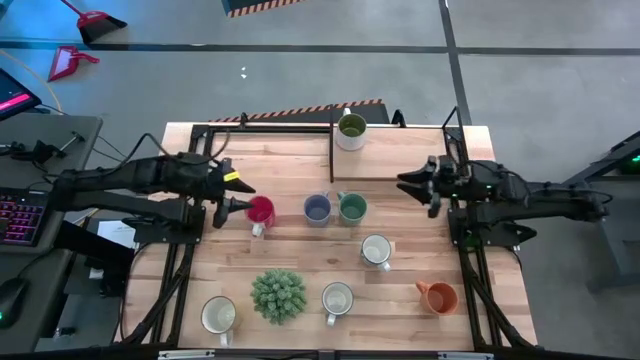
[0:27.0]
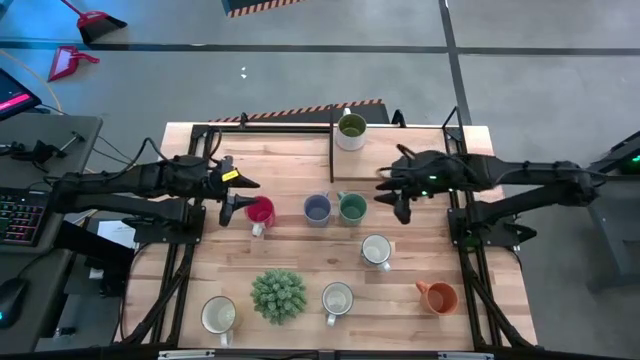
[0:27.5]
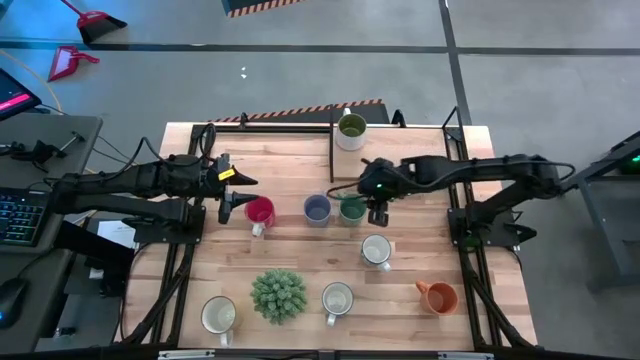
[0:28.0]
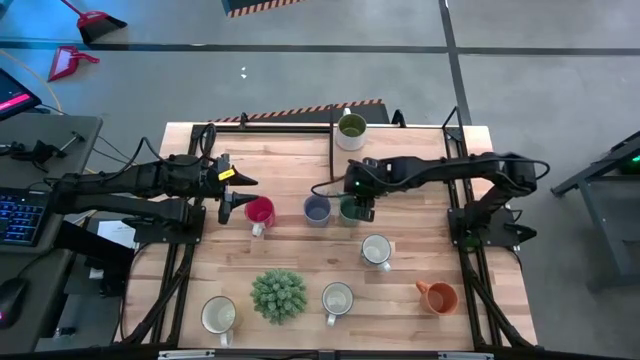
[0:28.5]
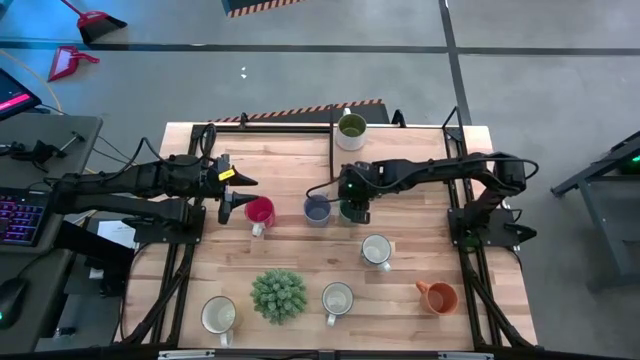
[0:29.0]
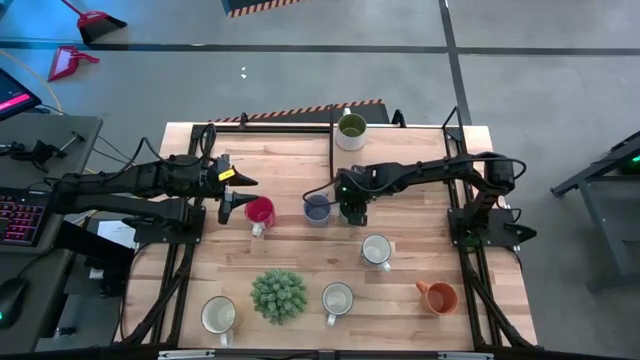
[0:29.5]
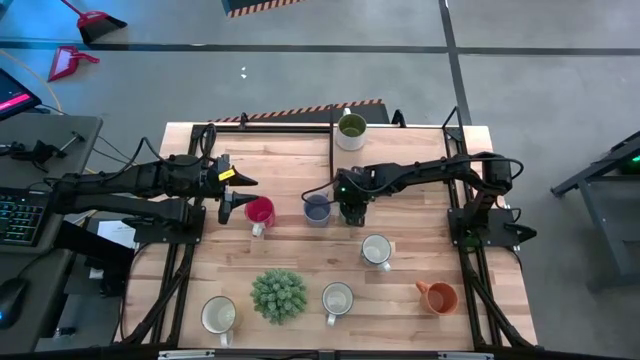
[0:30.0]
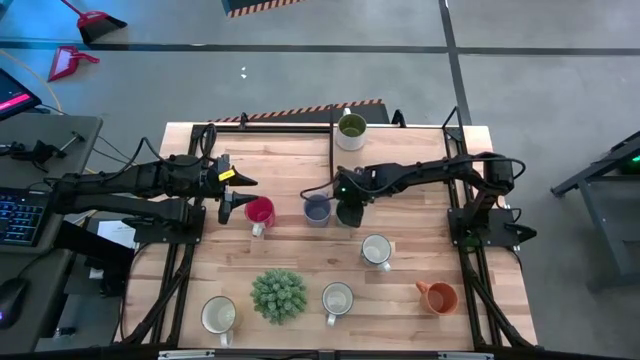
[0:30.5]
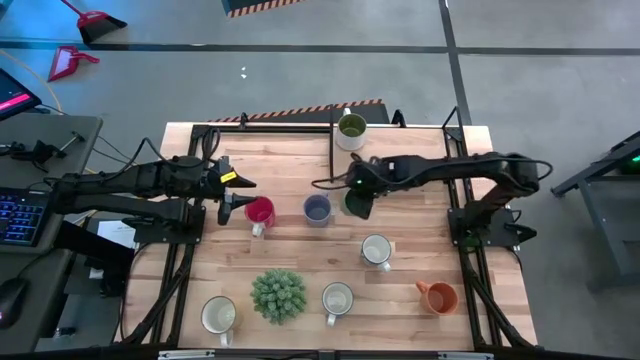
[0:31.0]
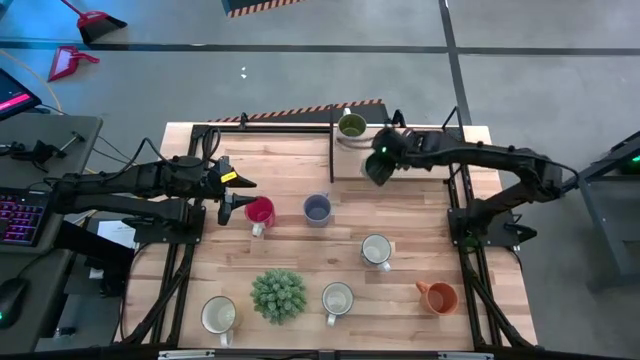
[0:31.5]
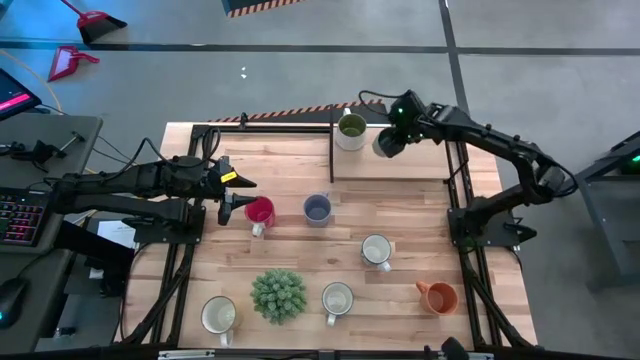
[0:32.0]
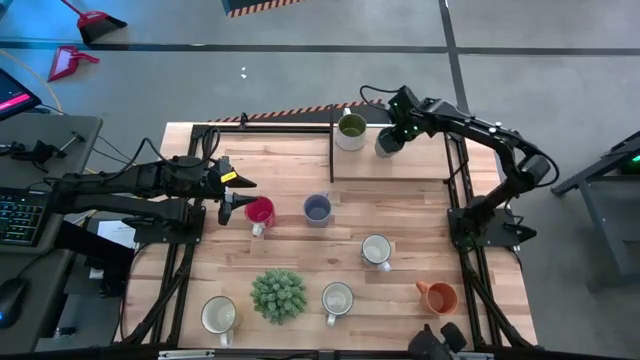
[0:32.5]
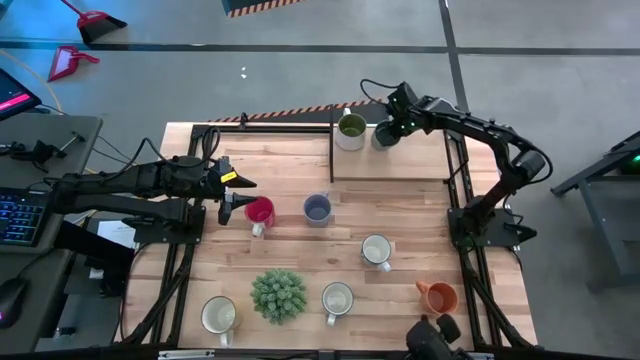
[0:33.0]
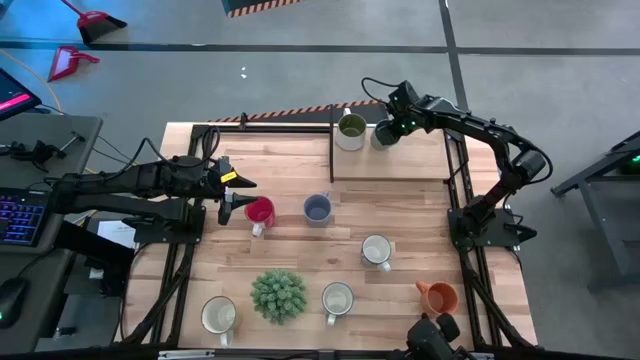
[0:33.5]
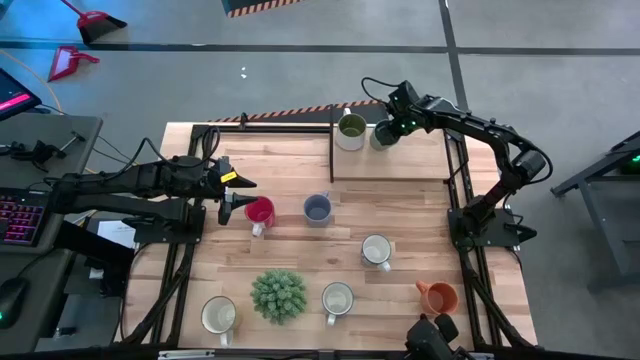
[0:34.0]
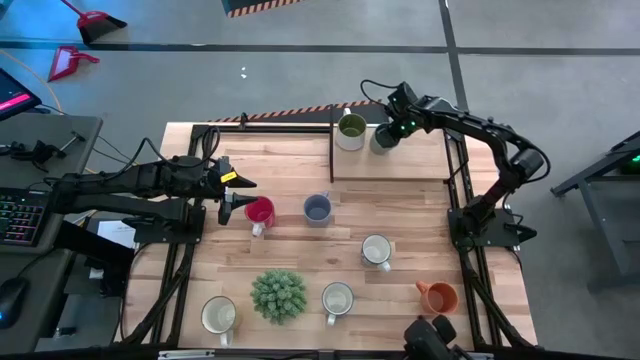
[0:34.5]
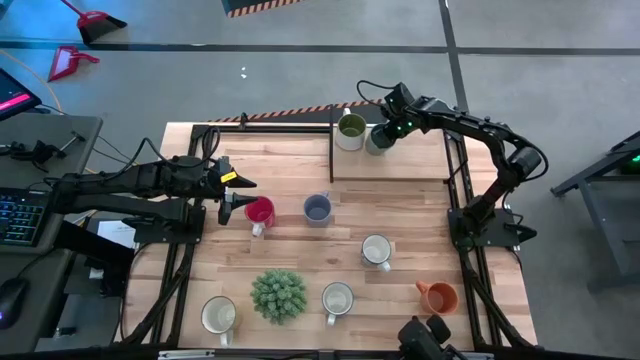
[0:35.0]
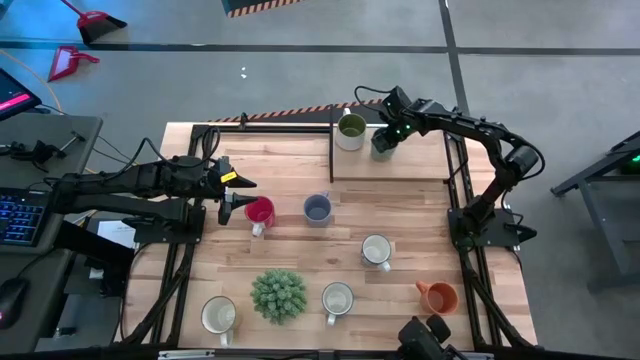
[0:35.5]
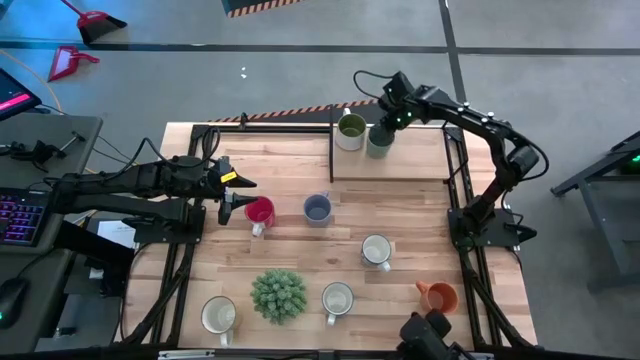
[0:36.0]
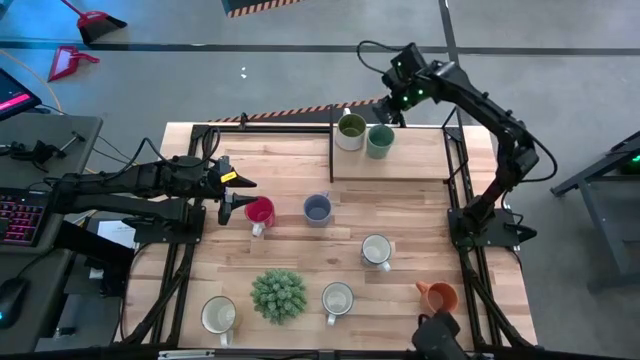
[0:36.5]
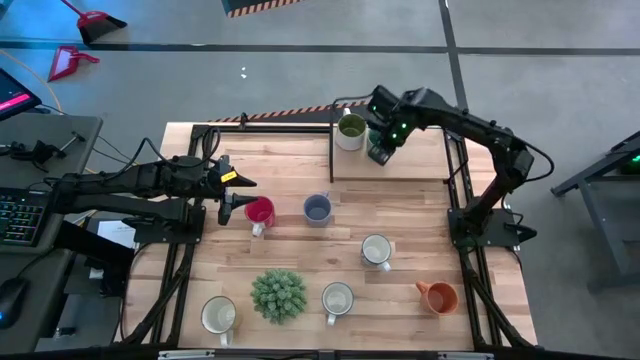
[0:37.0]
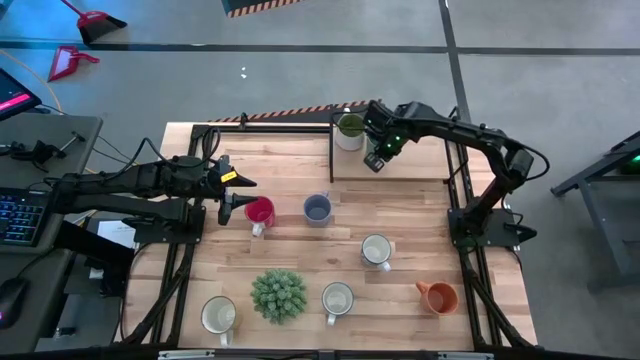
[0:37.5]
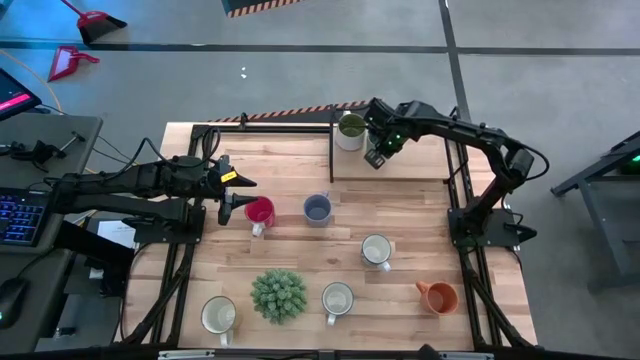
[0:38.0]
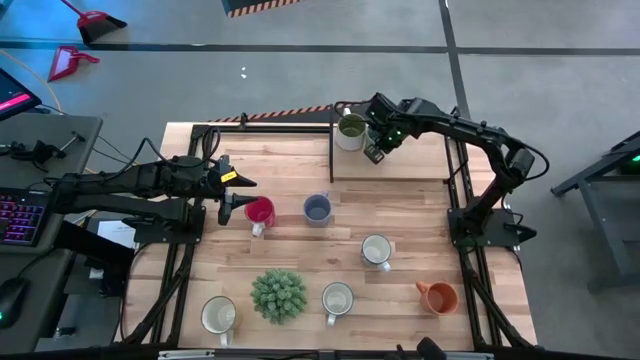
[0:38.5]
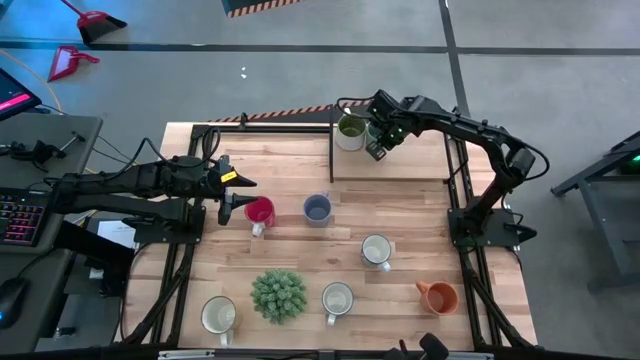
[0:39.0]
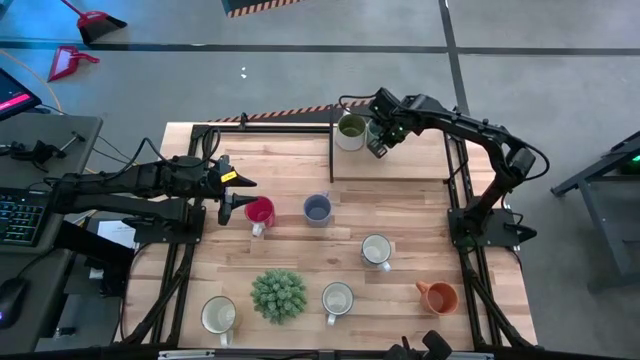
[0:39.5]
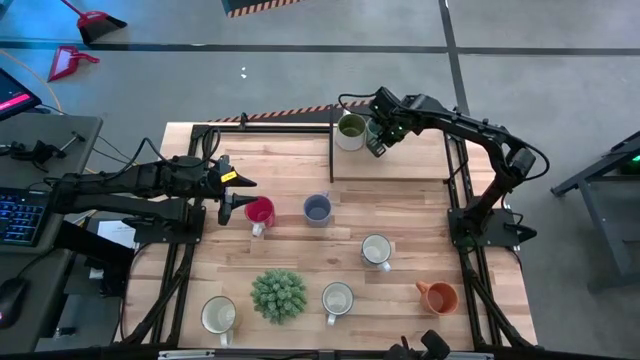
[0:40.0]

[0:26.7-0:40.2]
Task: Place coffee mugs
Put the light green mug on the shelf
